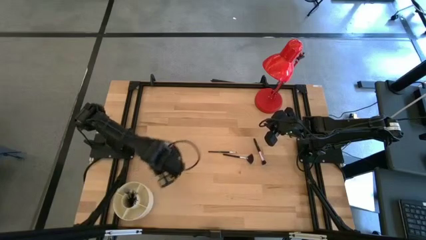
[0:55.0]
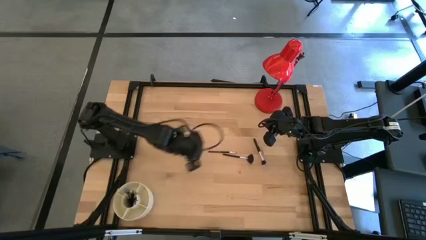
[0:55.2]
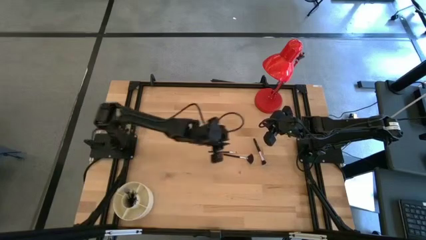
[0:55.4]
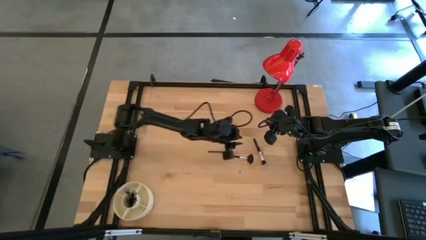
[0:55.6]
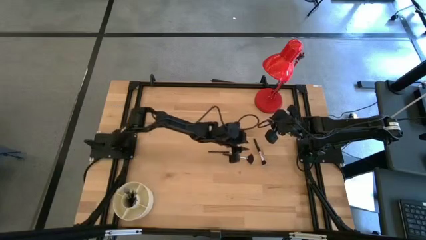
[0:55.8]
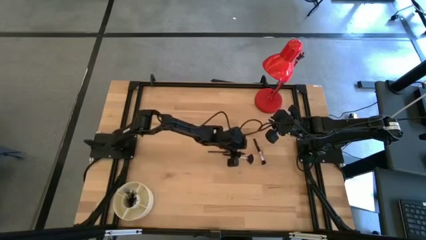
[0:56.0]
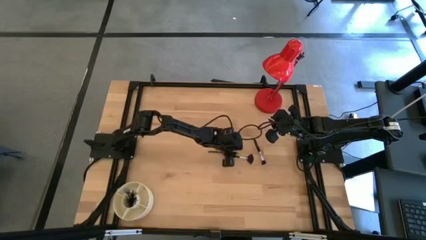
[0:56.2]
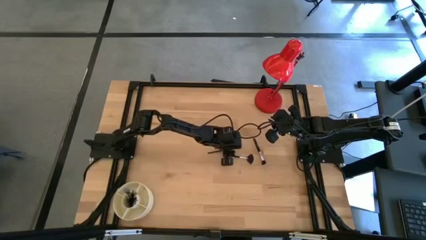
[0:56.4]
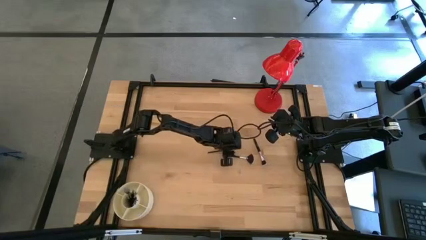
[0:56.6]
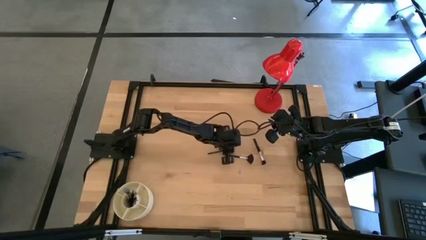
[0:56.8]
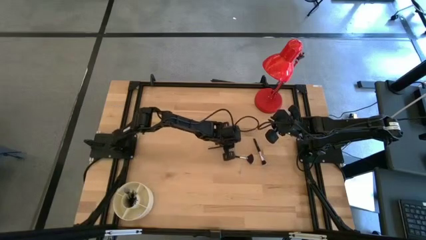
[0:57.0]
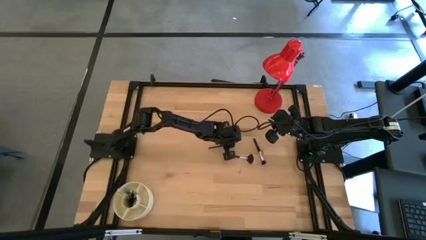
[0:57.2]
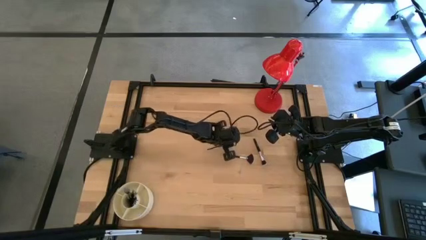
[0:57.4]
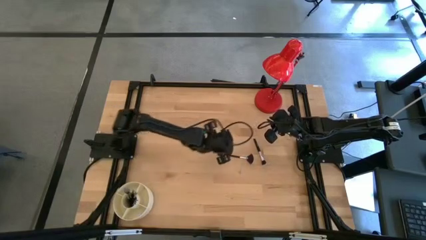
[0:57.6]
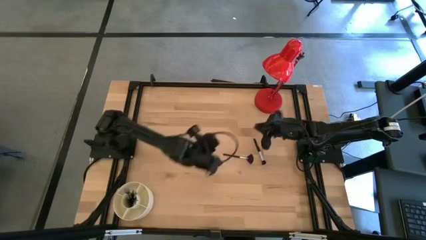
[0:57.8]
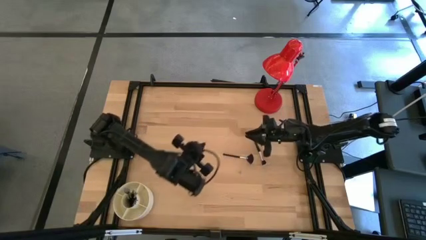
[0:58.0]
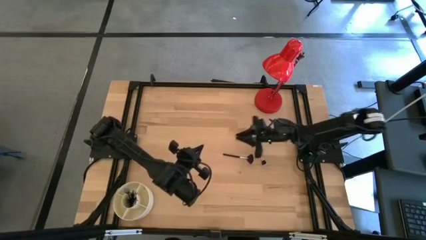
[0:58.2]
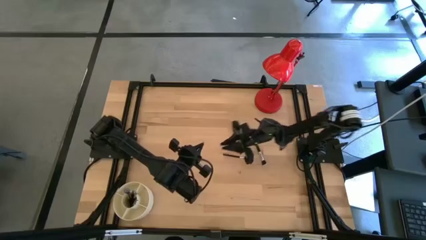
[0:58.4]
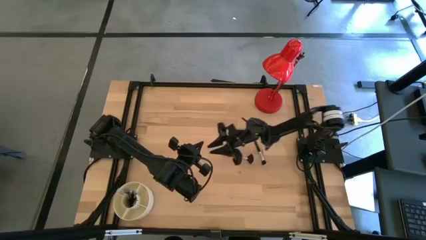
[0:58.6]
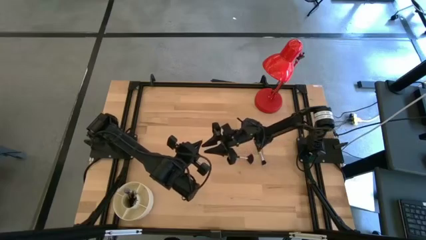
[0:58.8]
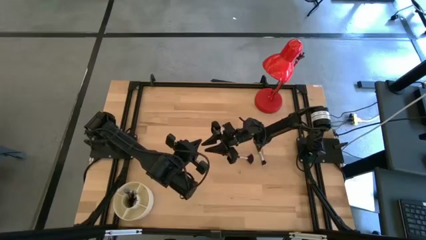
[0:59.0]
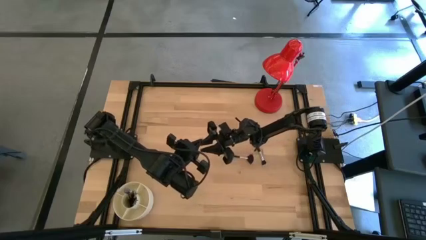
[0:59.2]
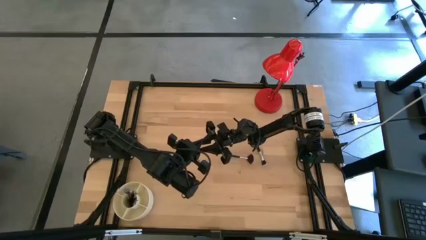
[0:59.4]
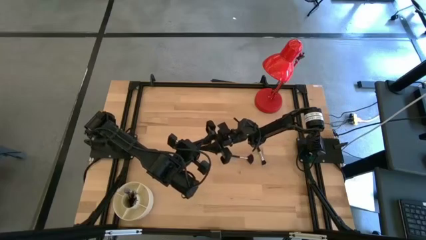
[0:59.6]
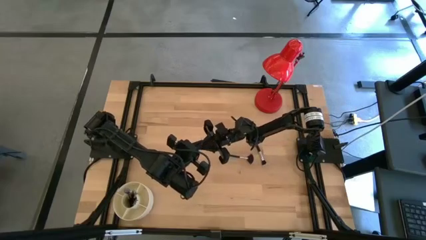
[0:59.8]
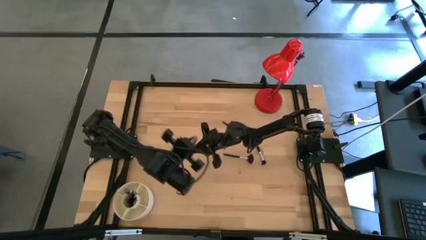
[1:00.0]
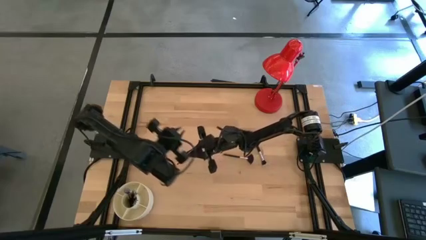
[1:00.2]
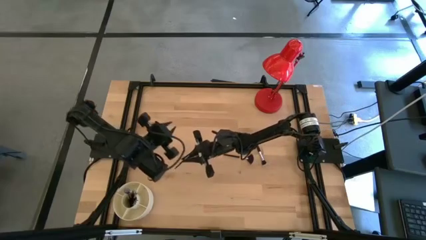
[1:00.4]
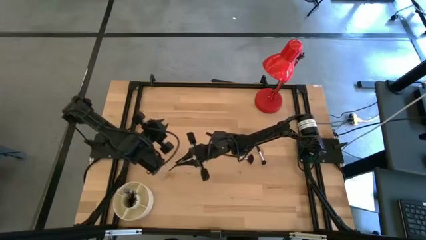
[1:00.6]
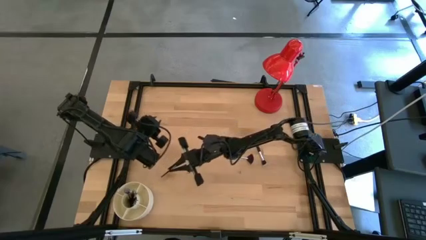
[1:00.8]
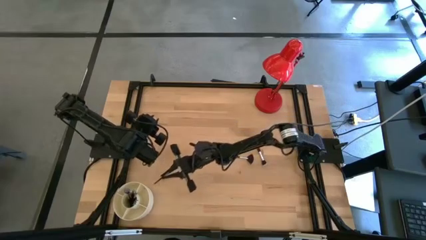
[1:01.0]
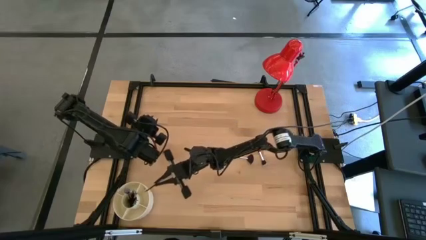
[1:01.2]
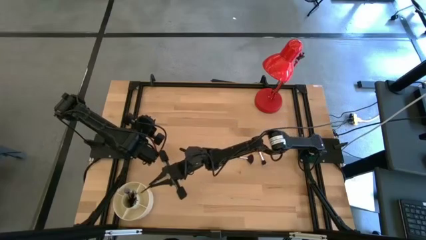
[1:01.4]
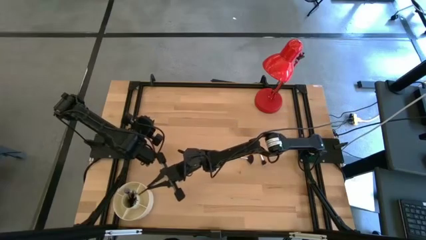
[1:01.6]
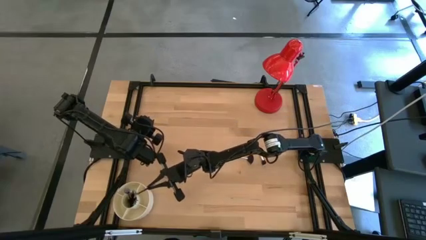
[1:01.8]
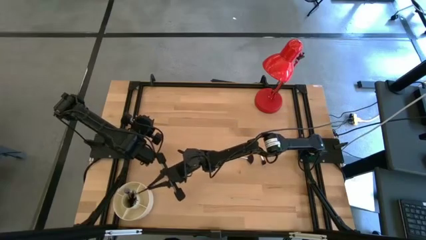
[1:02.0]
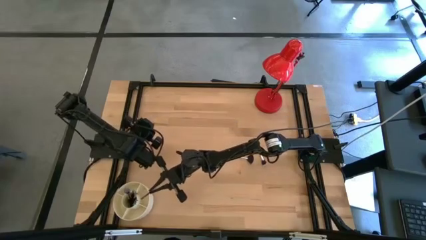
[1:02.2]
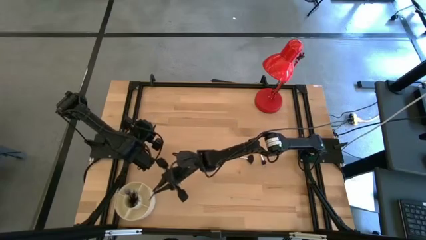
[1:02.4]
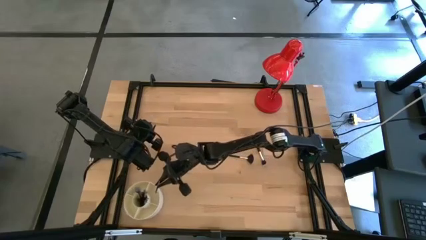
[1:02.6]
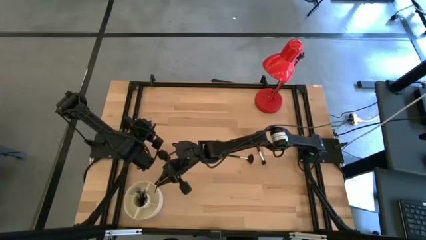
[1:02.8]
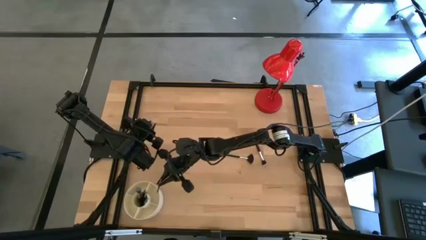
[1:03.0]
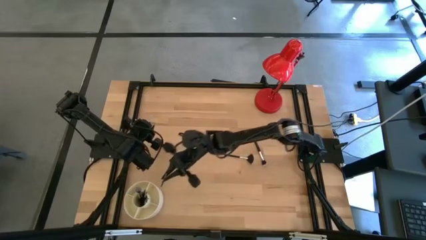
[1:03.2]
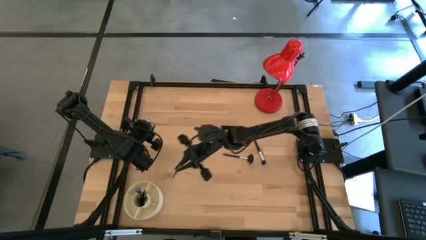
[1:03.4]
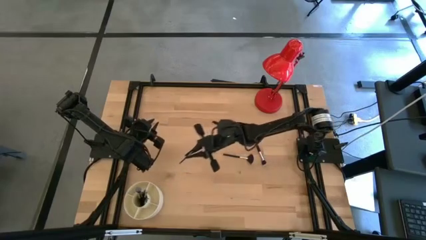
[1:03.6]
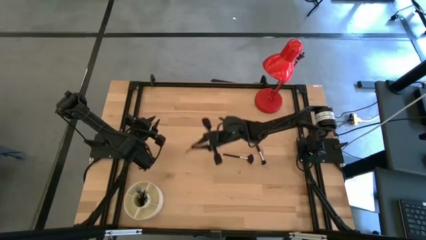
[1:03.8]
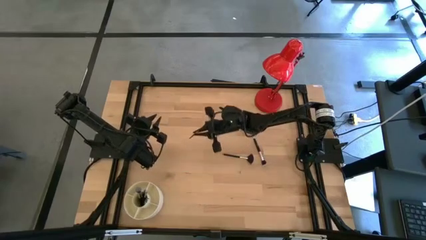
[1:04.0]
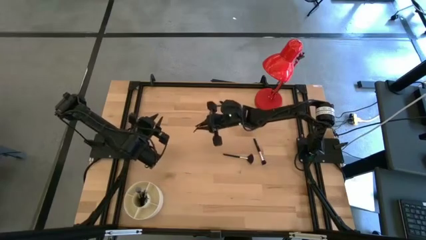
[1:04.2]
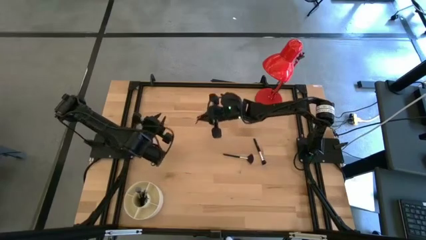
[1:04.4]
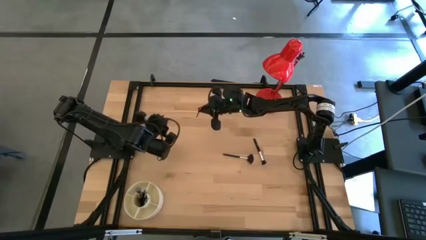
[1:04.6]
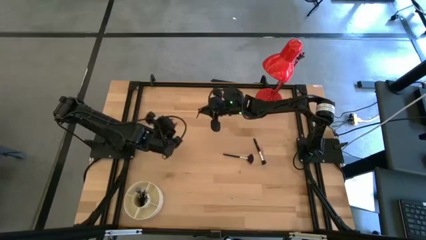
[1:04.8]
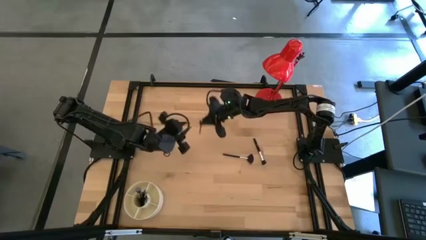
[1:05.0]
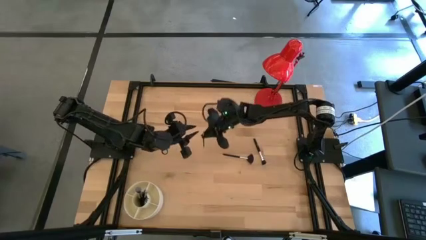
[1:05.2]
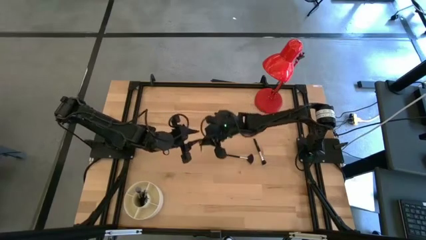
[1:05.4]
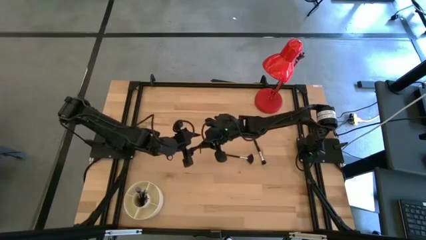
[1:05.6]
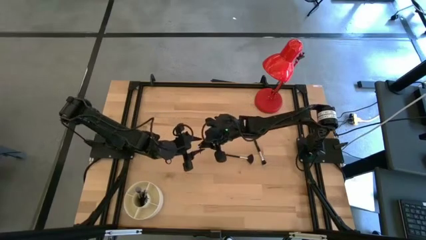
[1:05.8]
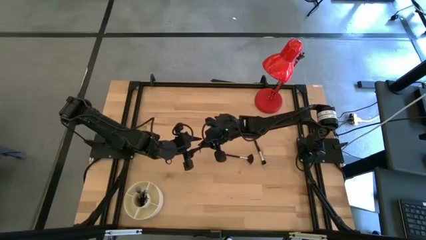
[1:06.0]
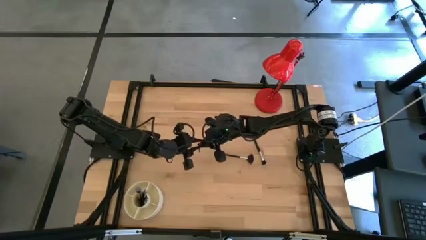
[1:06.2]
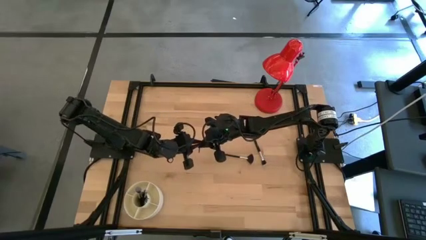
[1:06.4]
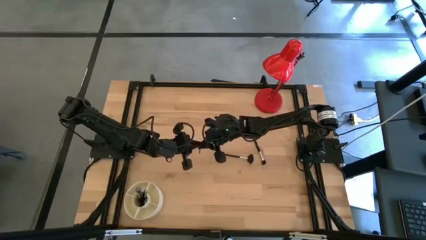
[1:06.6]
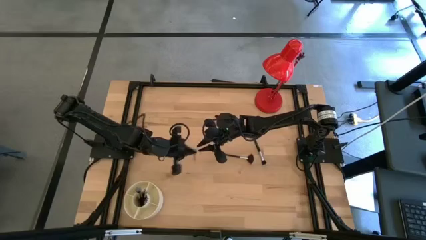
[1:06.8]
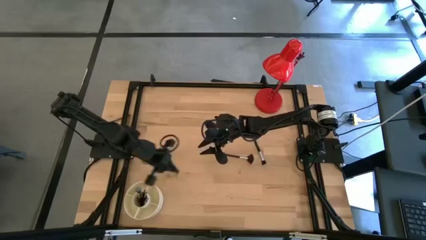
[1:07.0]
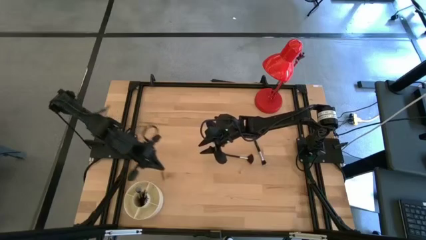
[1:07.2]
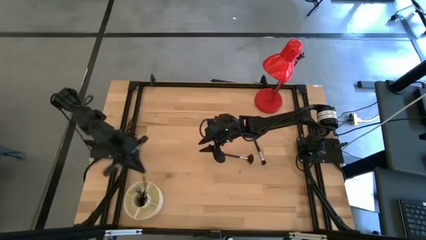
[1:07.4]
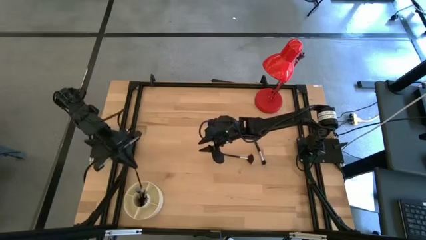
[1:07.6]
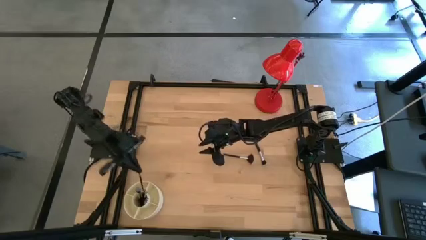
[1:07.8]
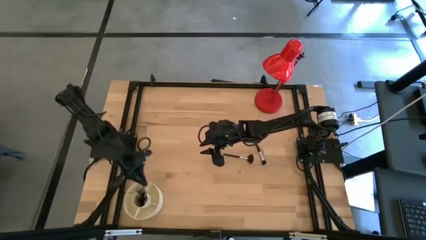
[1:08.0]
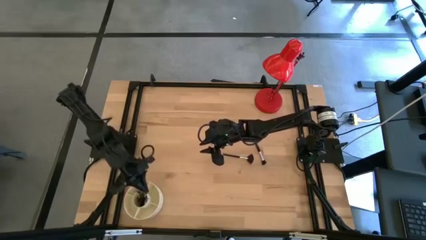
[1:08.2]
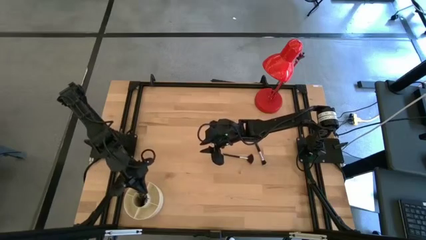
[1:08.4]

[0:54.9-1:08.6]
Task: Pick & Place Makeup Brushes
Put the black eyeshadow brush into the makeup organizer

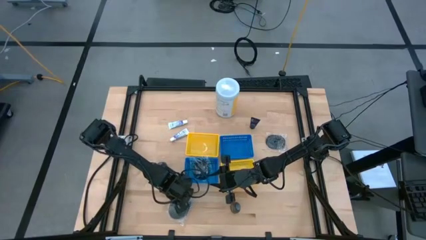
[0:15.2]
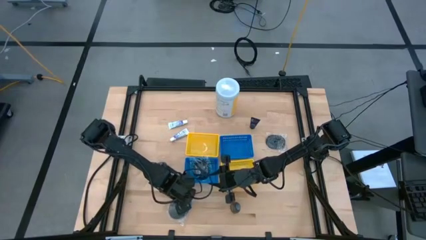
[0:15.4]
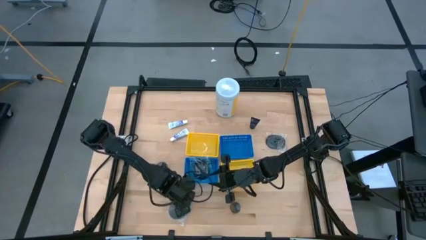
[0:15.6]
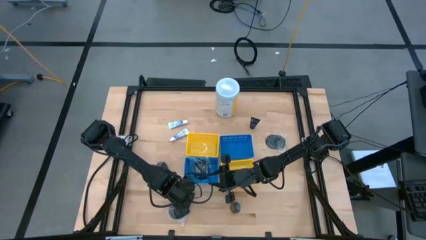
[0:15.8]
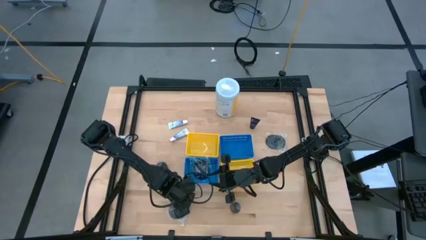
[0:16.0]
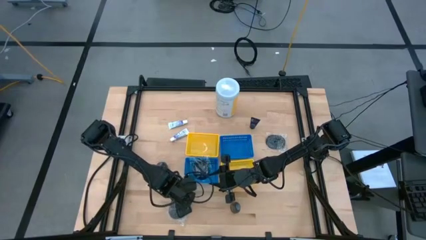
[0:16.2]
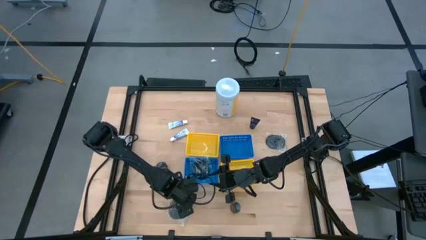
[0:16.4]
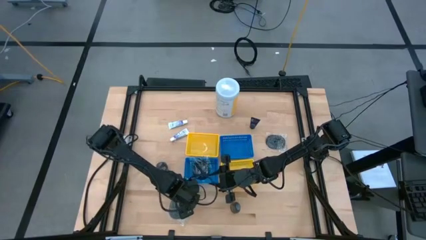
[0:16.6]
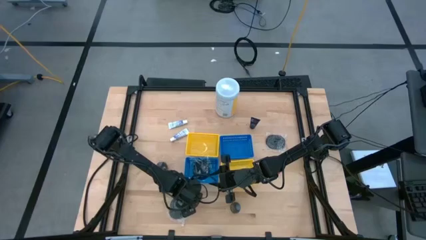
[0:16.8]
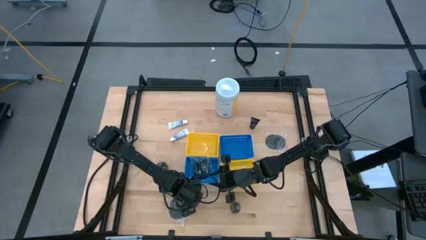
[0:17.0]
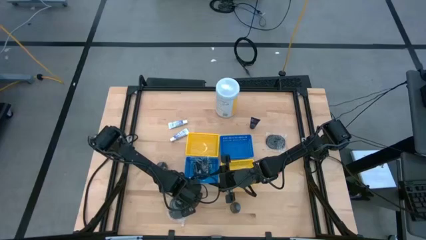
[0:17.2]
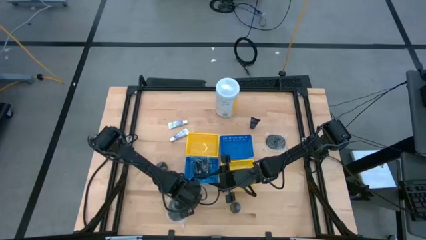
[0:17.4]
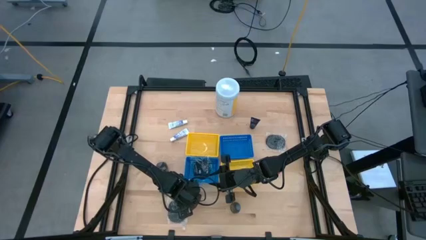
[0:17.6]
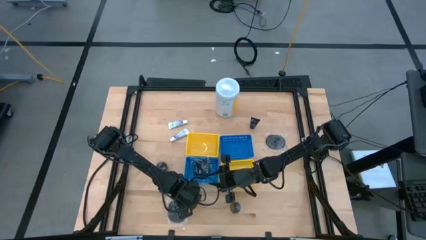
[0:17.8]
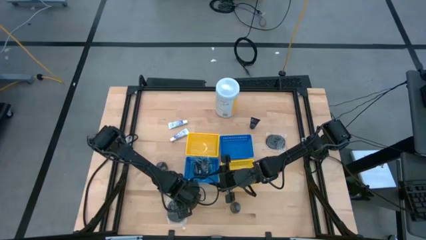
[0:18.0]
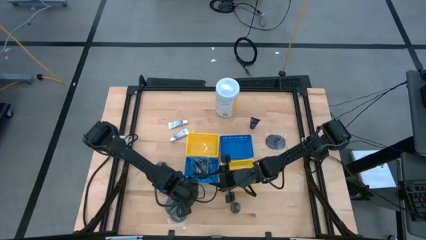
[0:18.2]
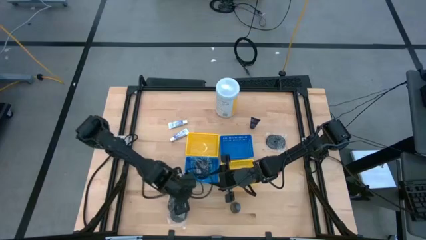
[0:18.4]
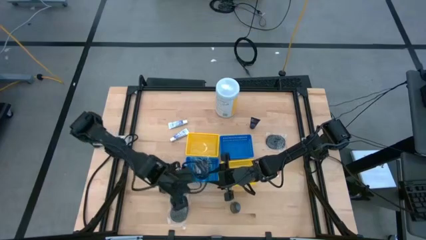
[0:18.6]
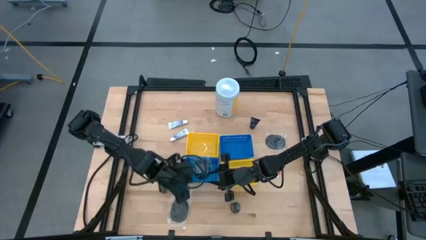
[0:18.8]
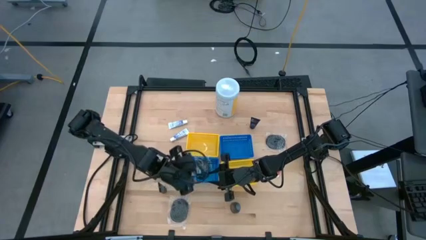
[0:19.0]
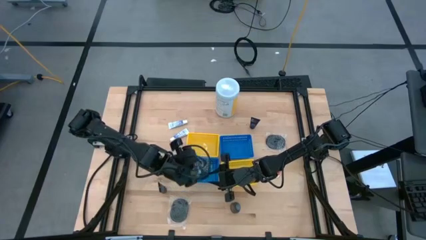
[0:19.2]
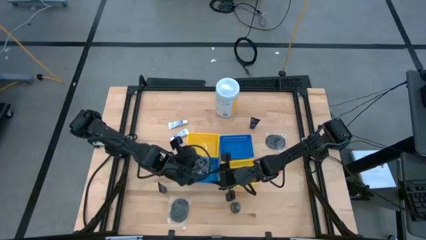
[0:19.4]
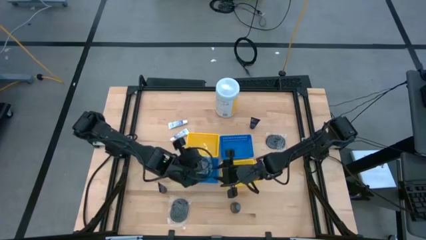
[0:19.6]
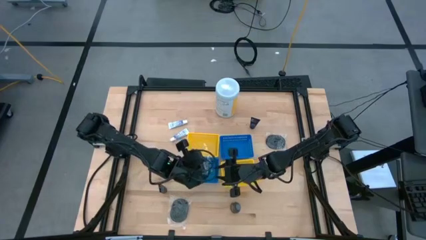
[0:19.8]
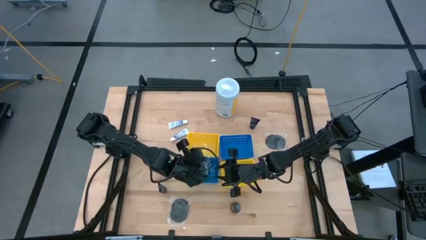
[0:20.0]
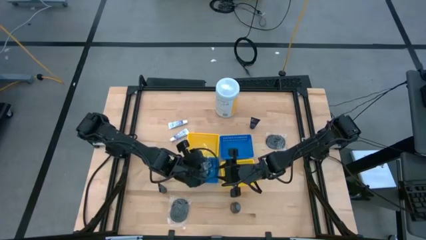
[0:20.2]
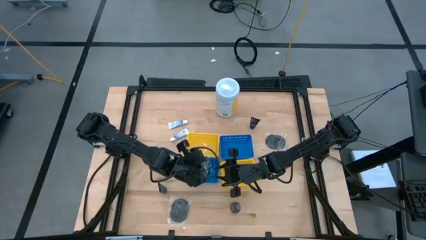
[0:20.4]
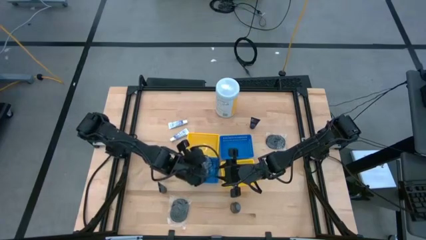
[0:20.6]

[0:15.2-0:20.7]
Task: Pick & Place Travel size toiletries
Put the black hairbrush into the bottom blue bin
